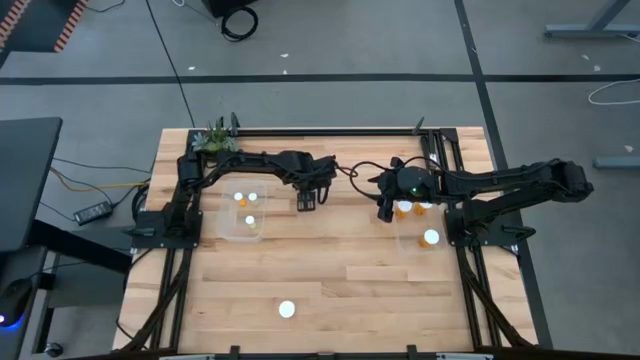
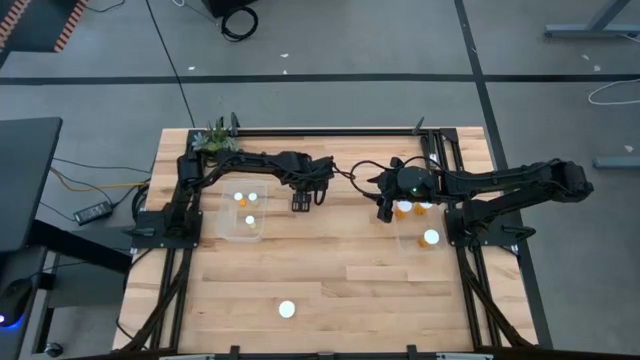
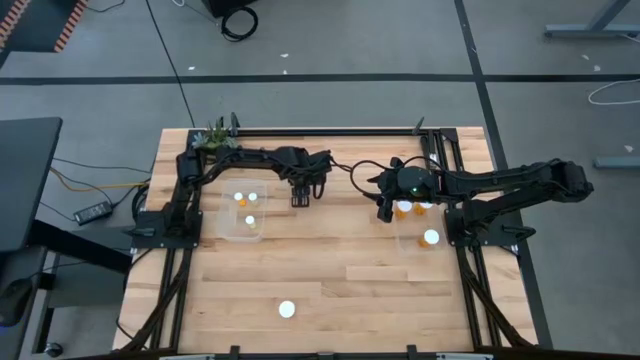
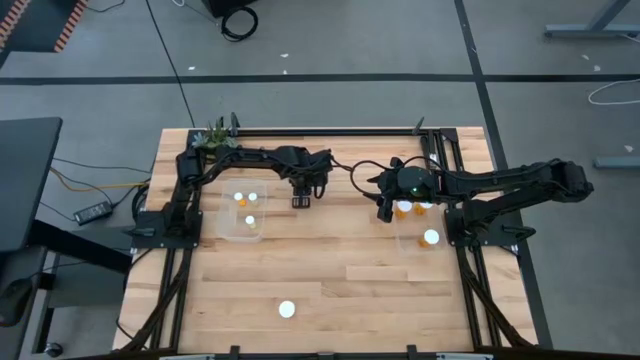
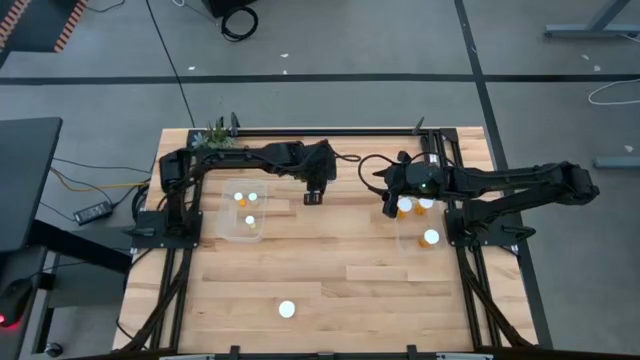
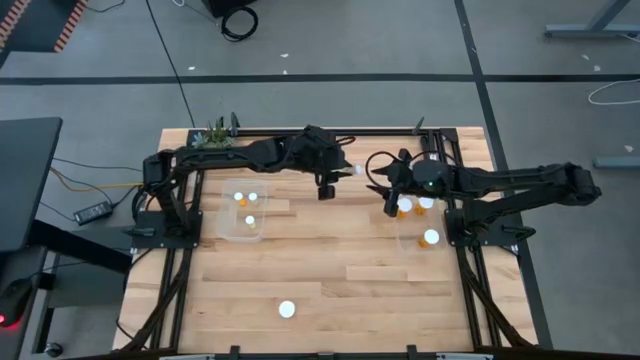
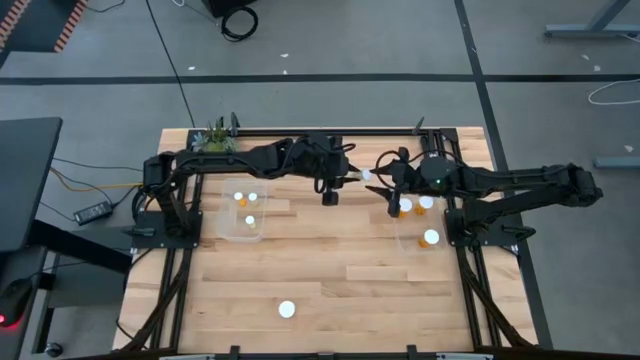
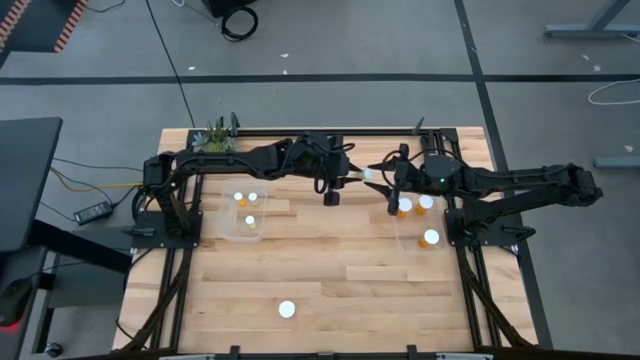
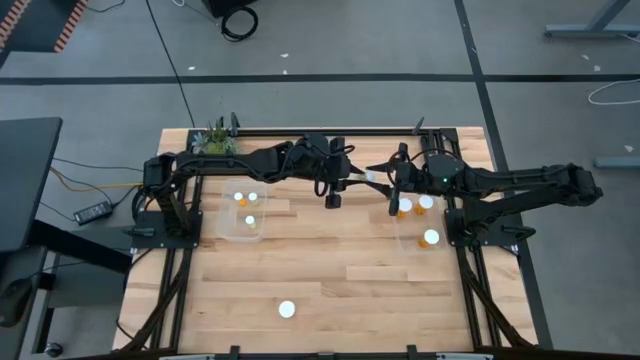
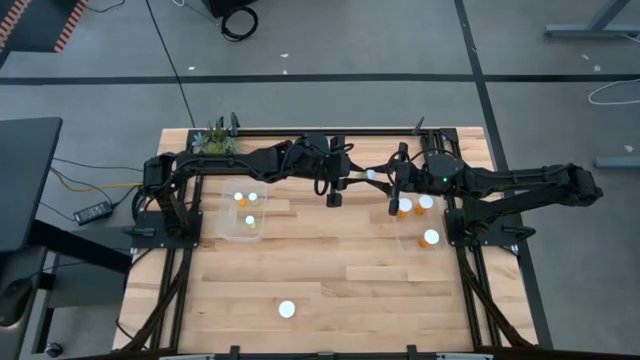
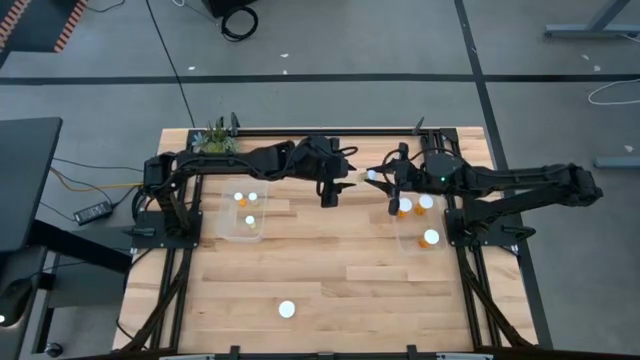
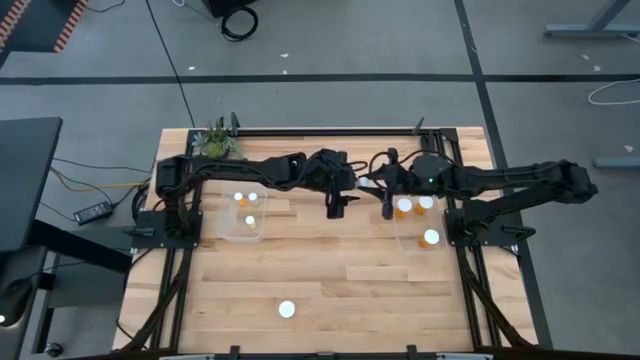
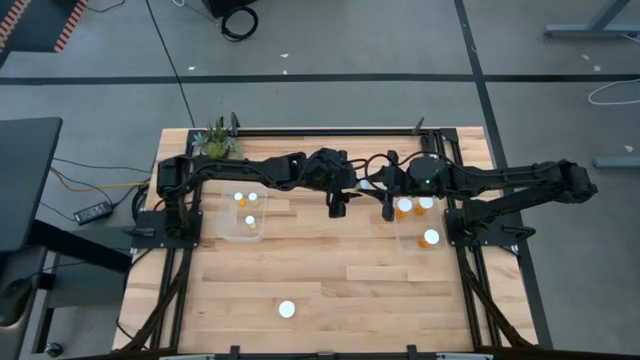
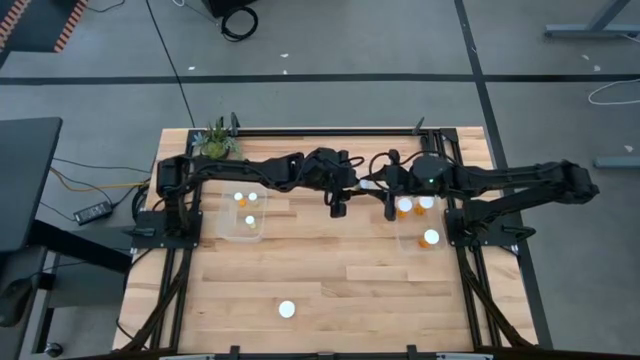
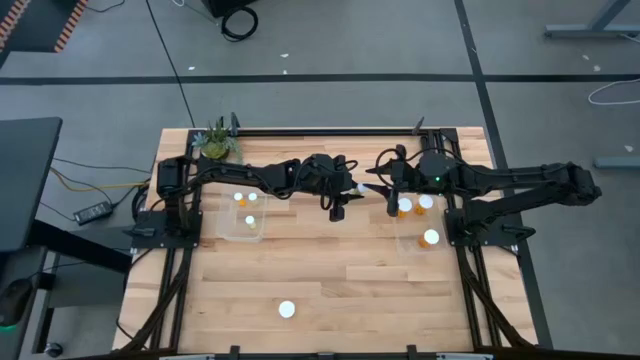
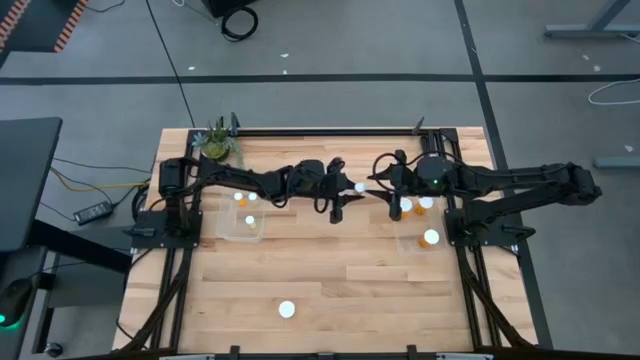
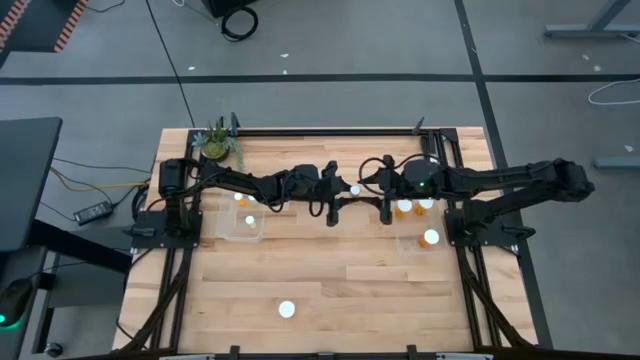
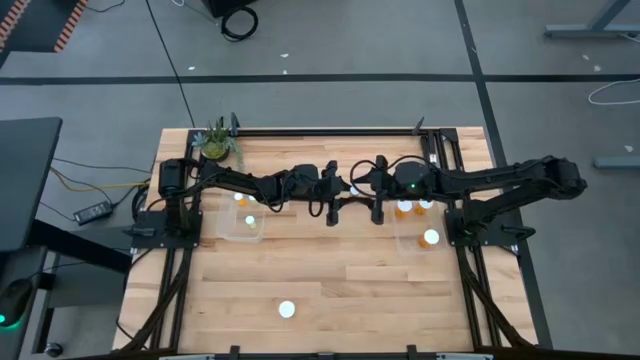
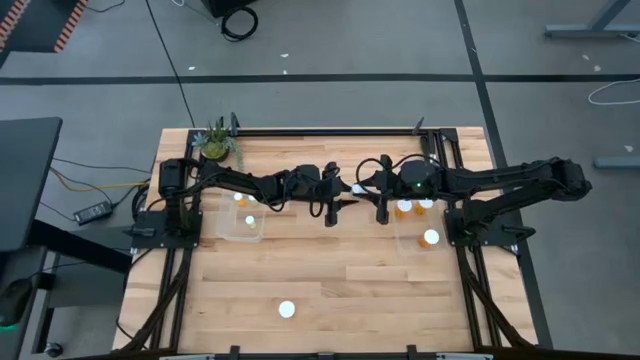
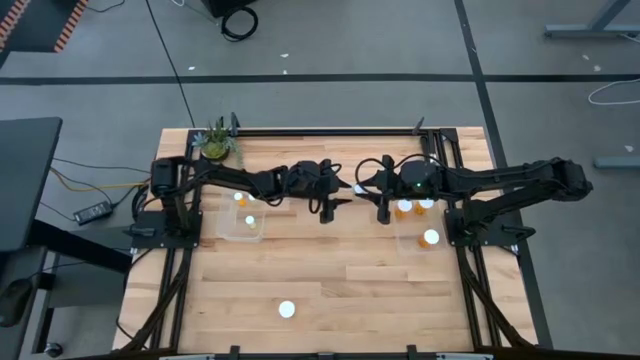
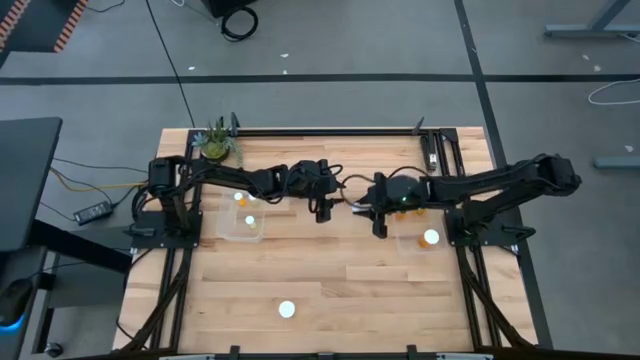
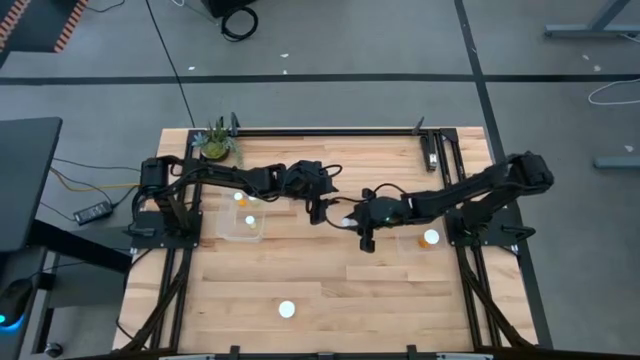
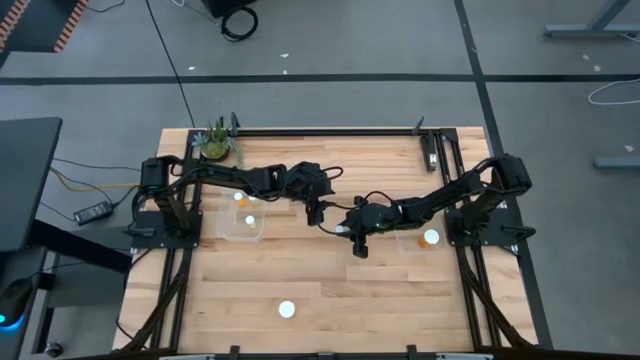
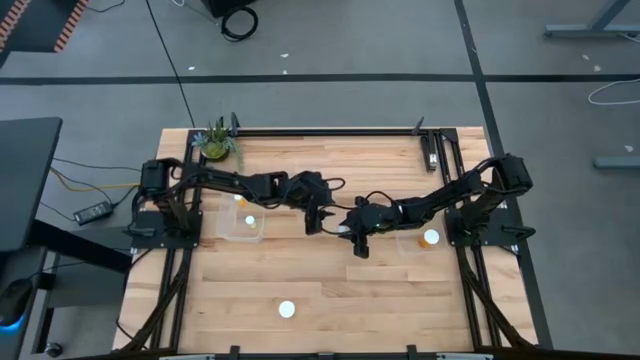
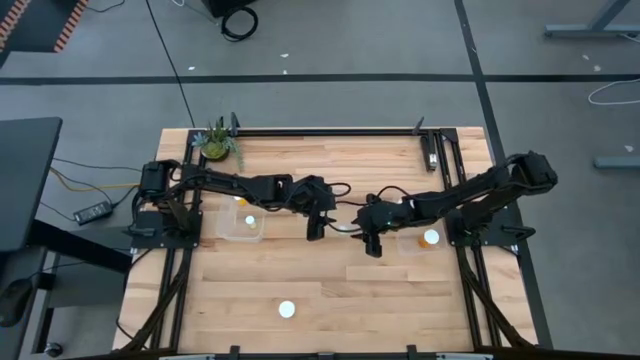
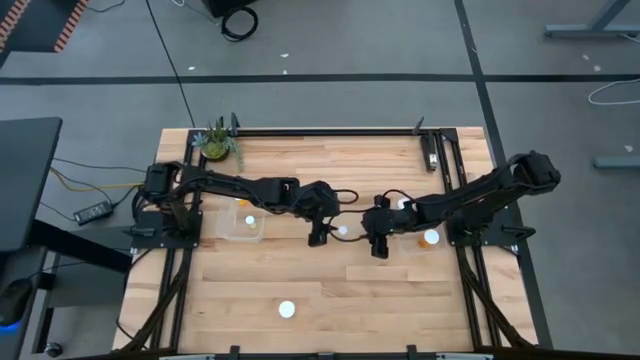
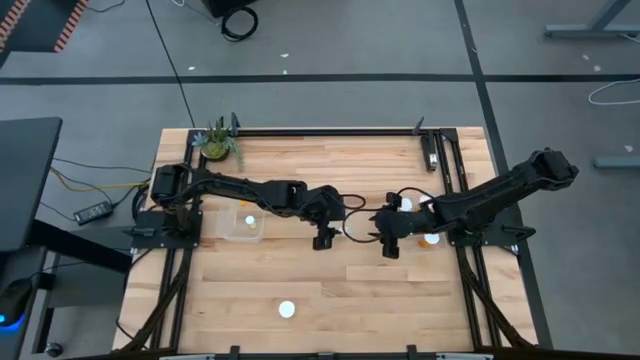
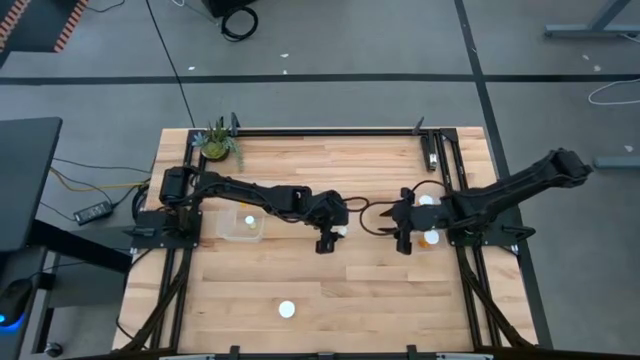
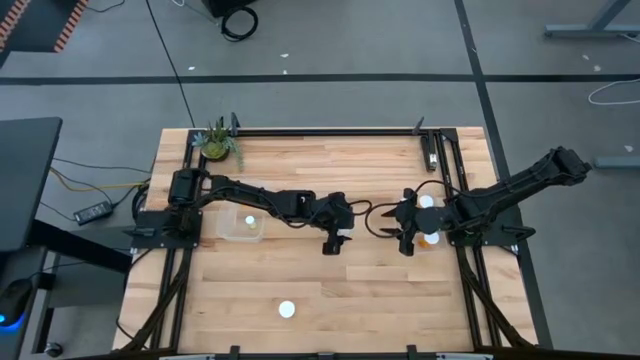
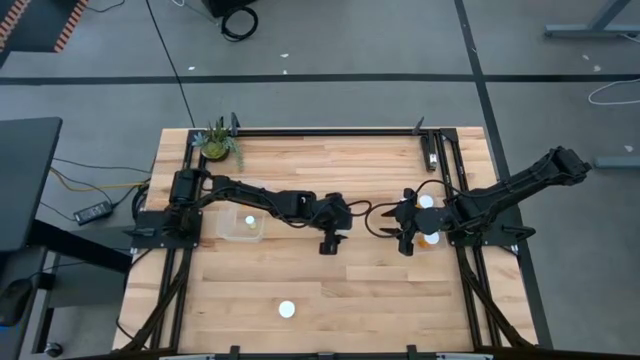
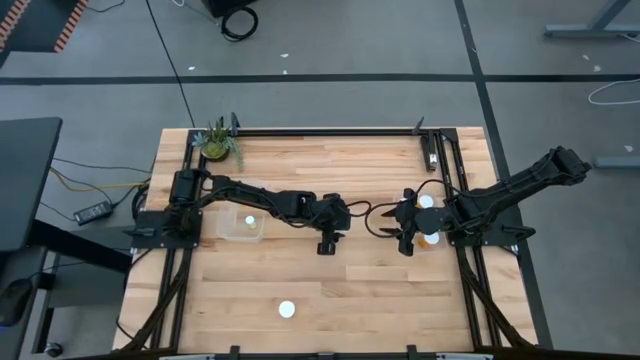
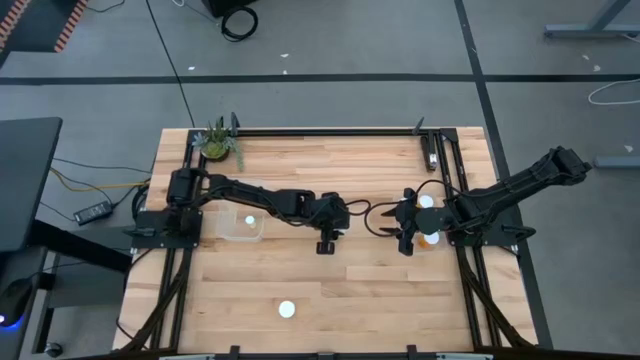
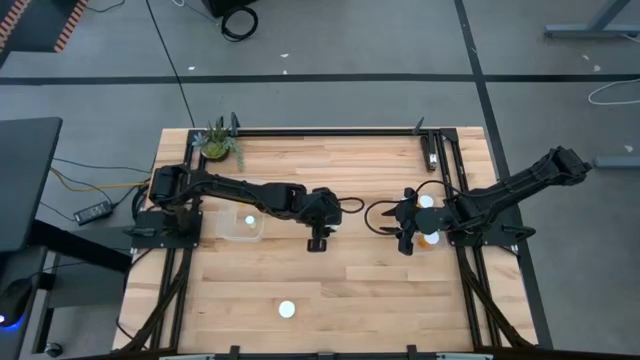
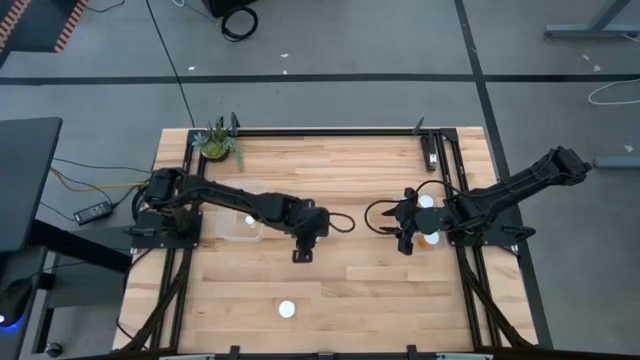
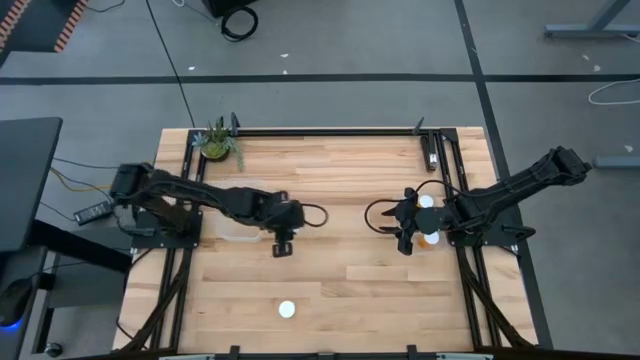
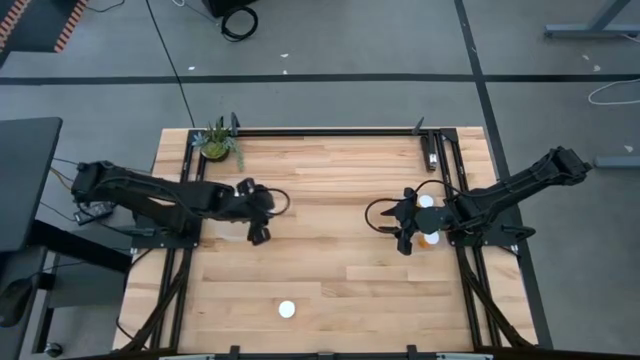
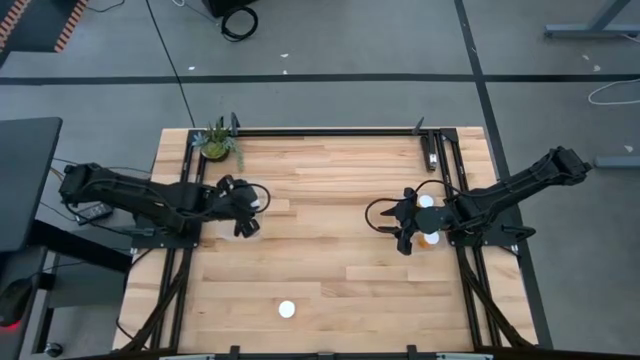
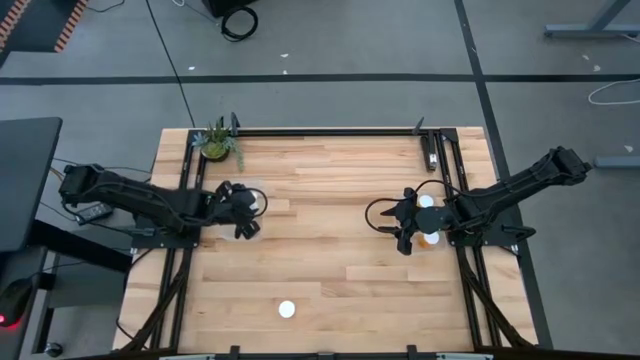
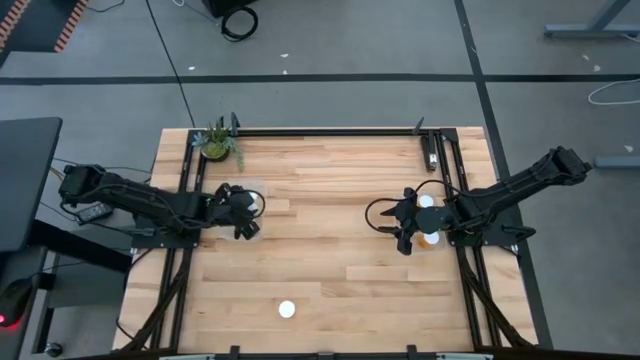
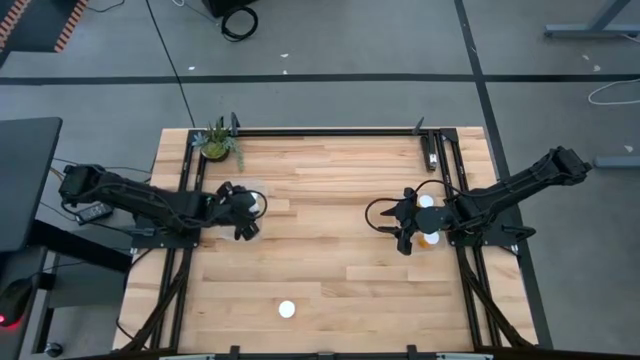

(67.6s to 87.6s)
Task: Pick and place medicine bottles into bin by pill shape (circle, oval)
Put the yellow pill bottle into the left transparent bin
